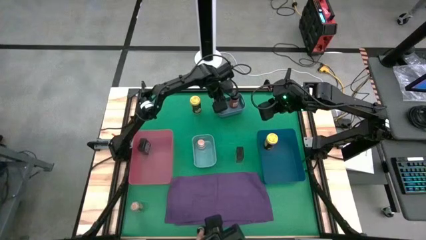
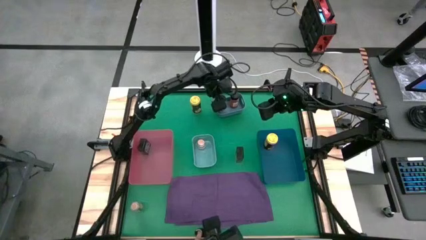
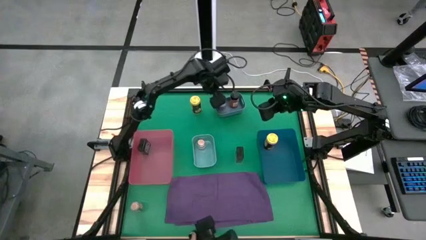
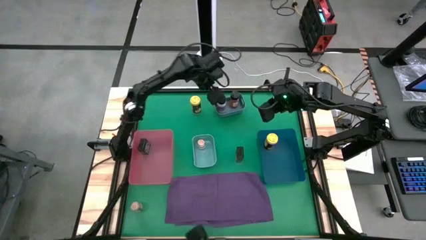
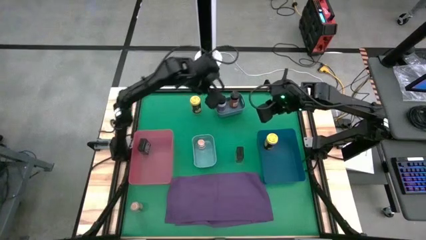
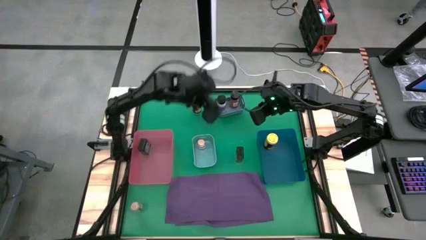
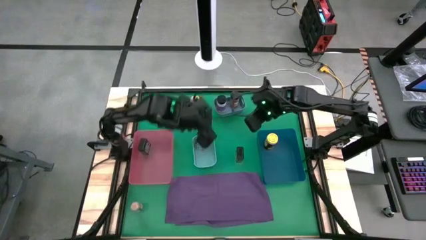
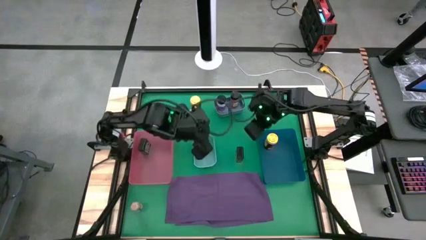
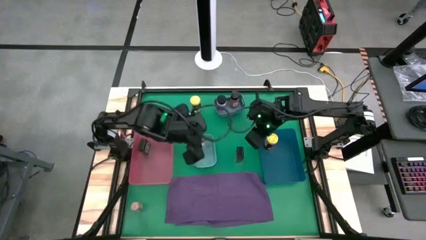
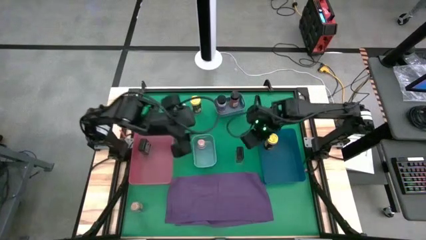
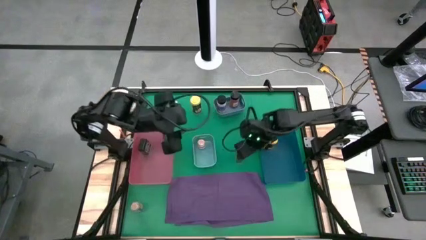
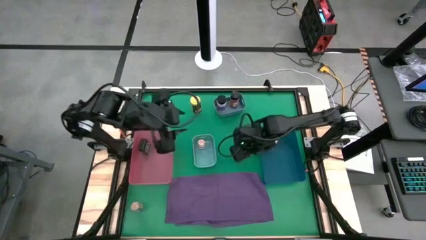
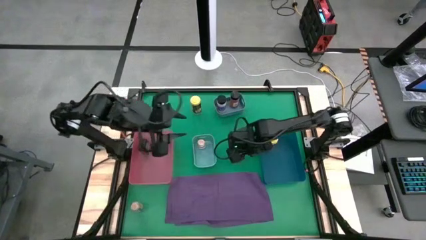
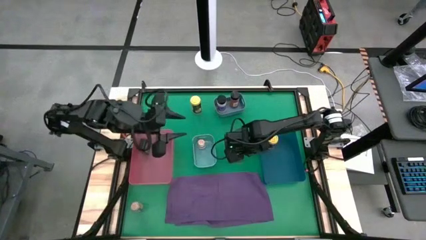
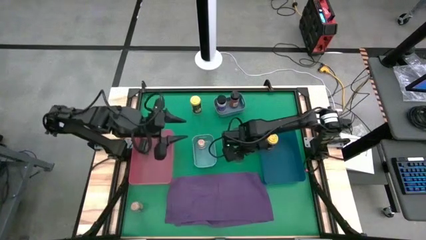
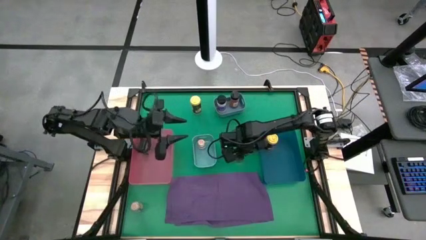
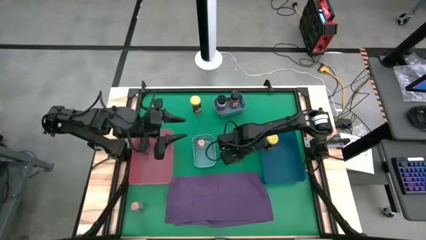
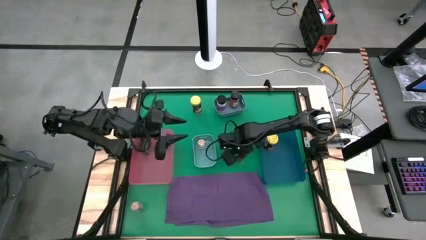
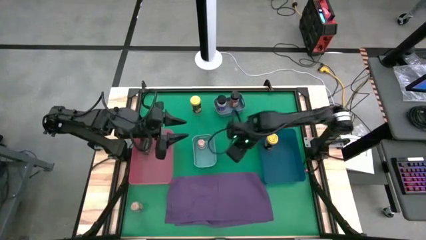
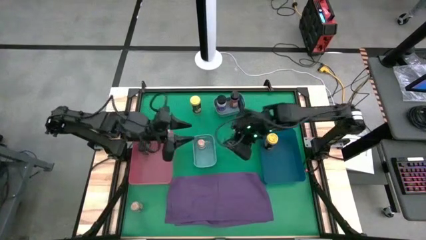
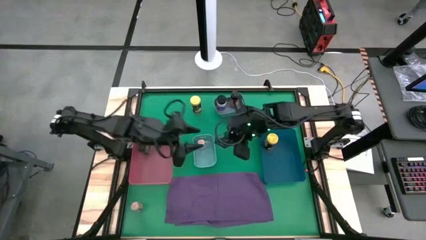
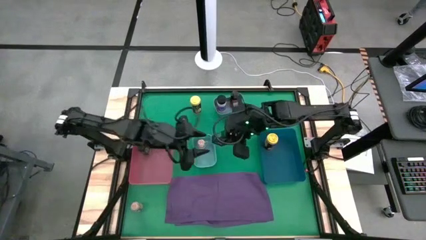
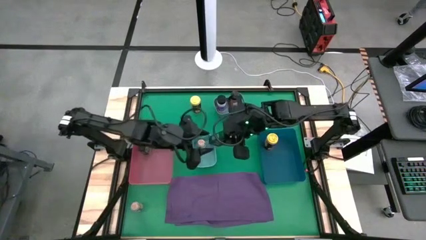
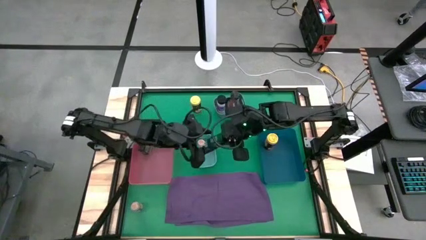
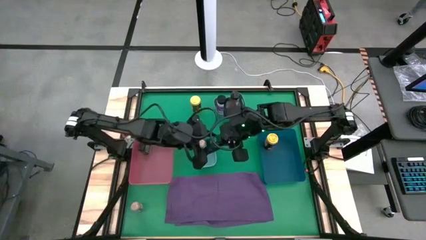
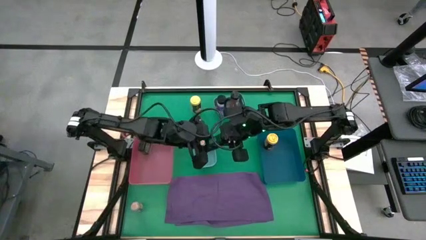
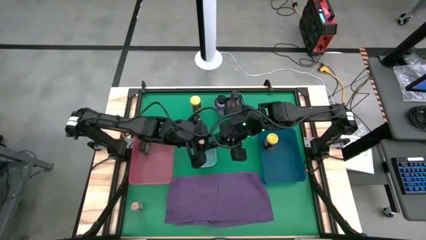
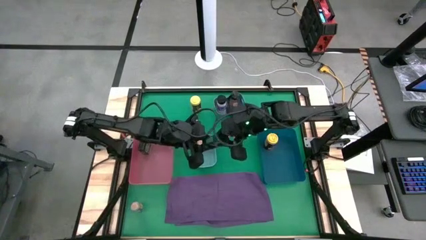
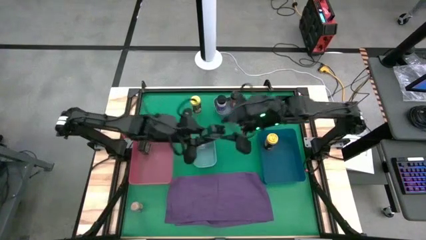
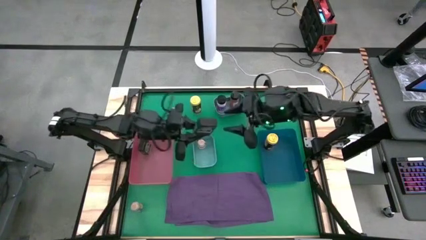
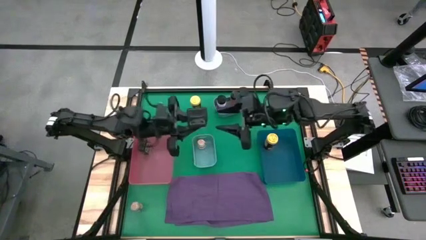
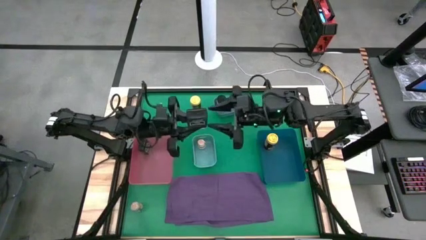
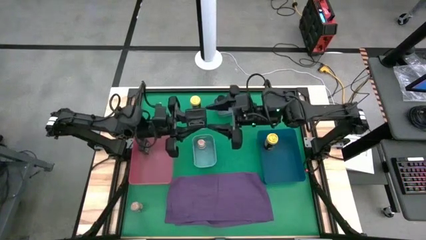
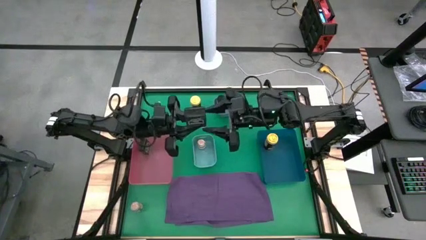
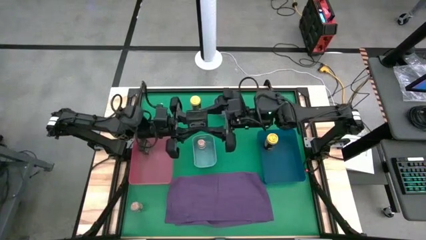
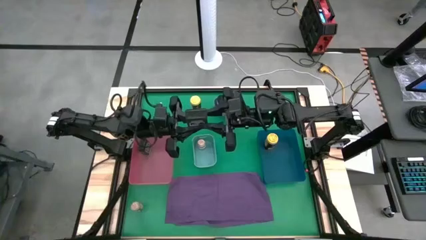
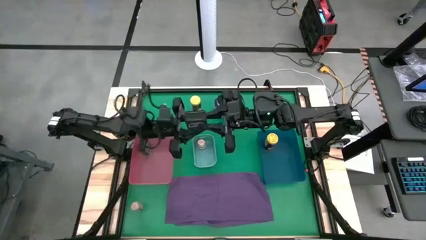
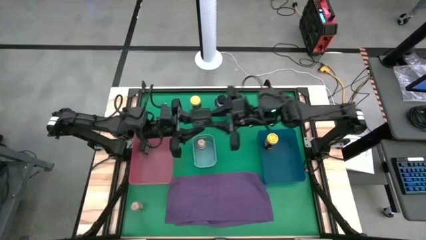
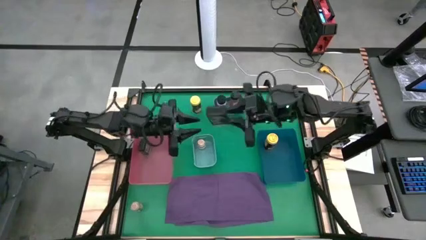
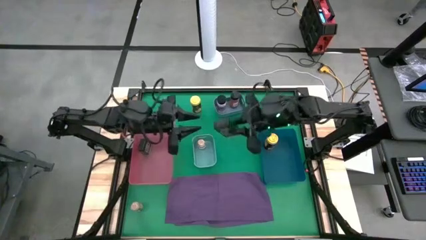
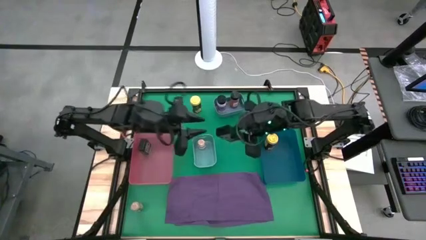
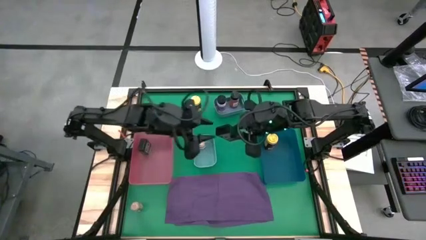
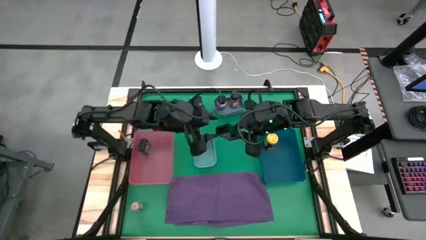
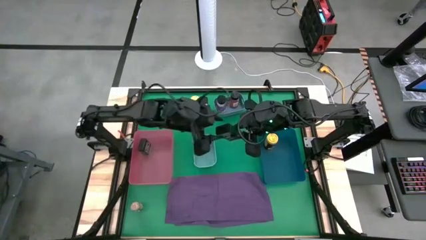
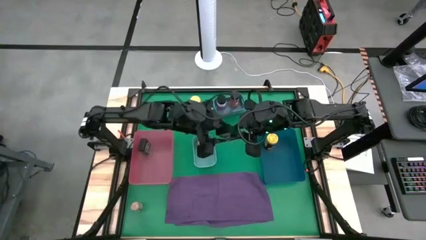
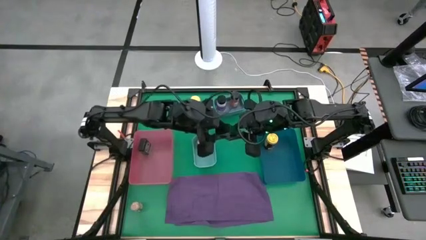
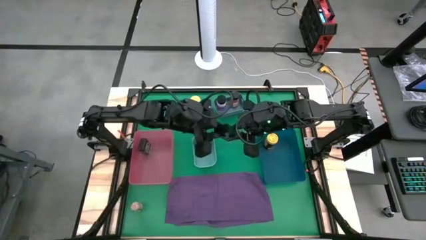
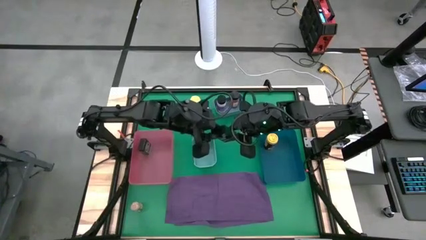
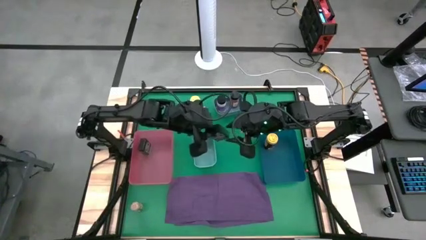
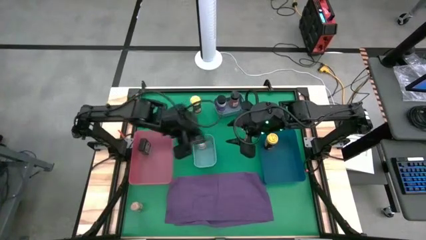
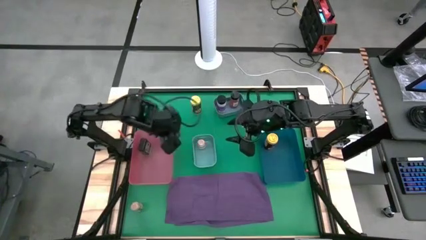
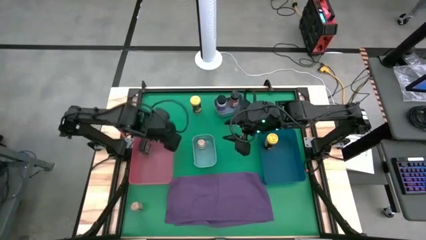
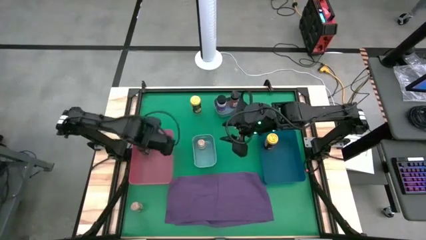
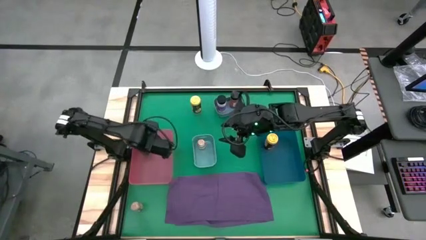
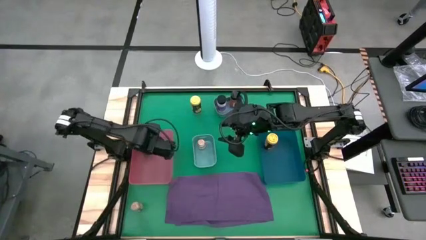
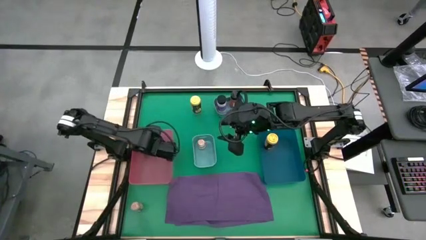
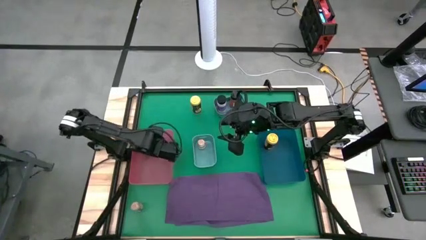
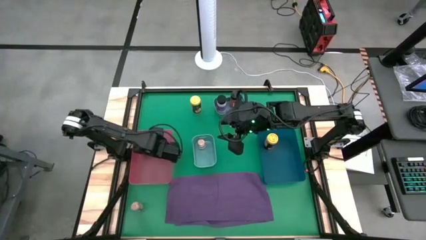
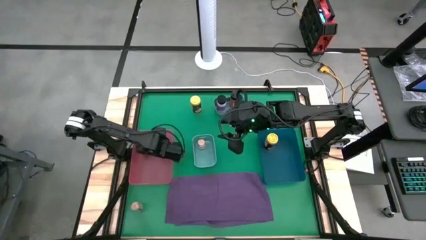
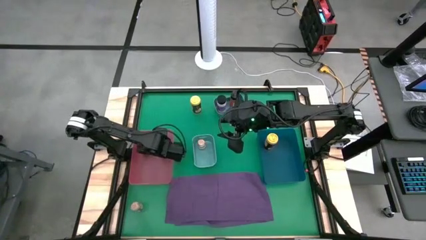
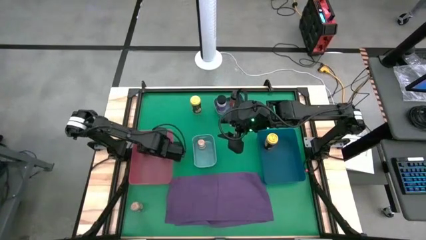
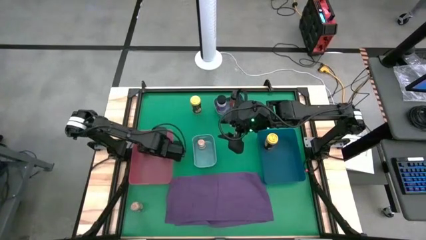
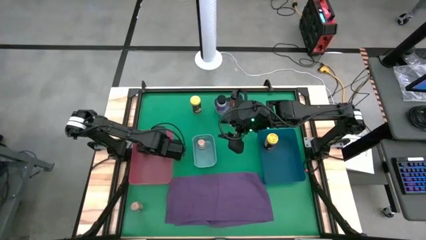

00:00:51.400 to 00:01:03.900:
Task: Sort spices by type
Put the black seasoning can into the pink bin

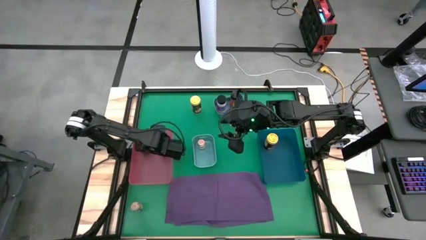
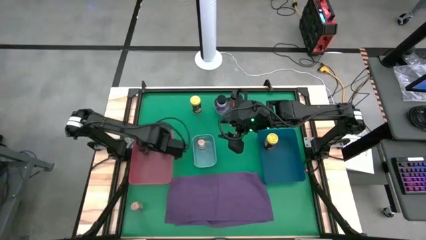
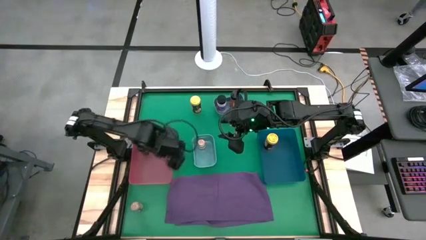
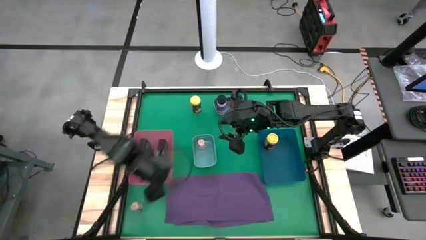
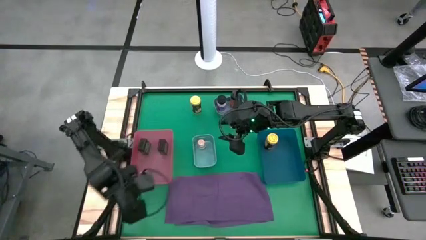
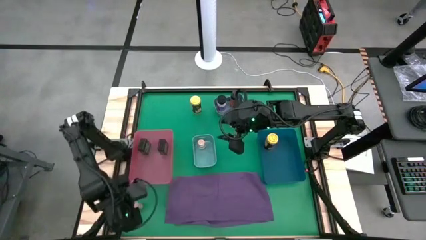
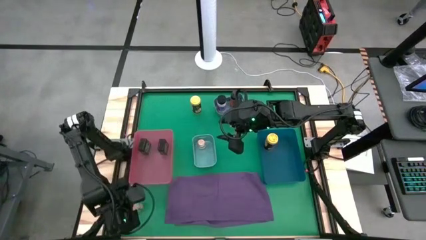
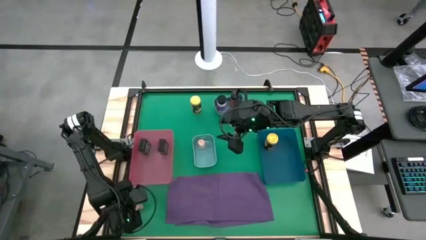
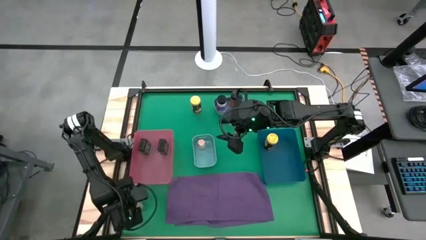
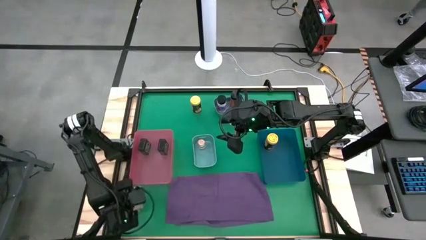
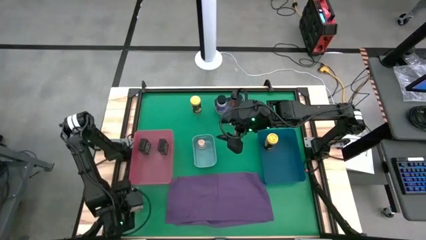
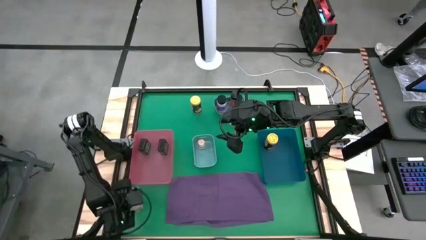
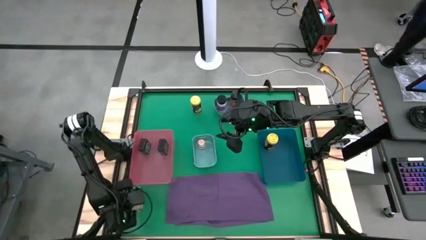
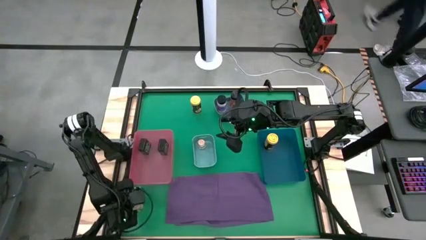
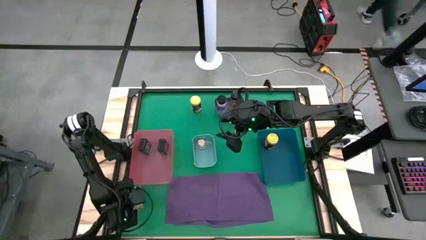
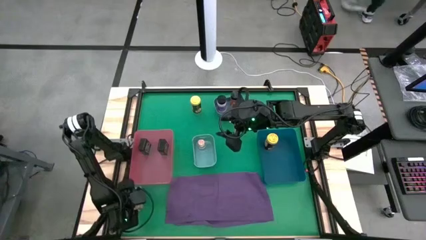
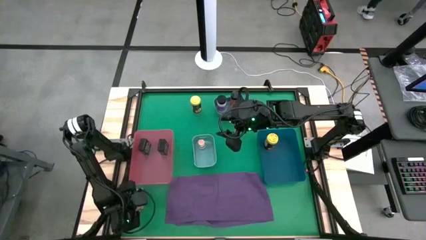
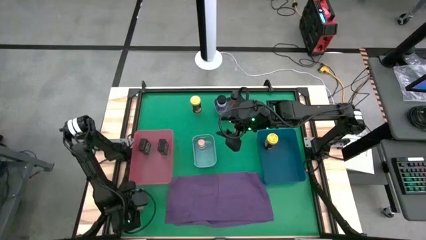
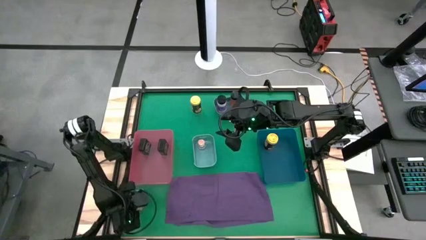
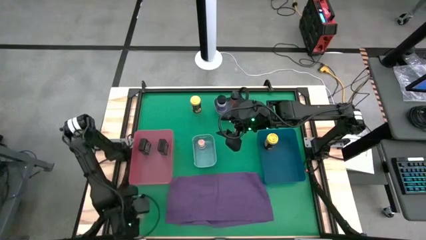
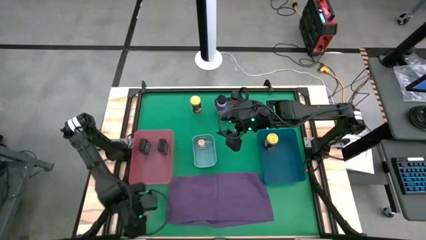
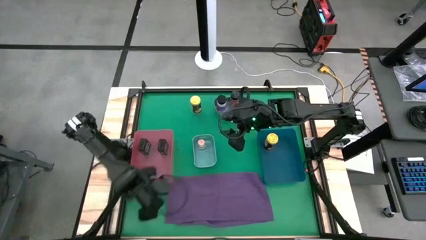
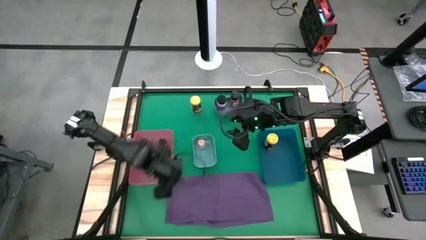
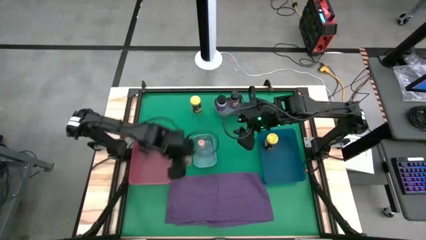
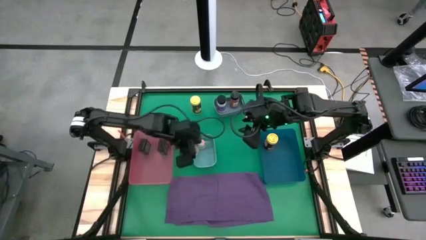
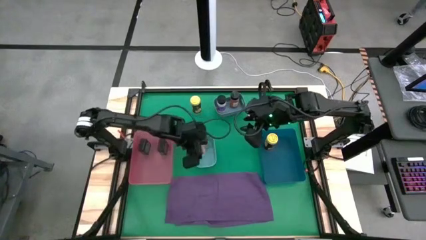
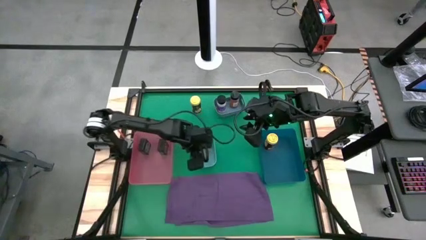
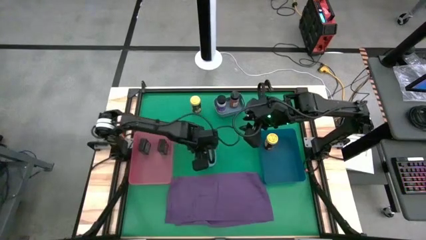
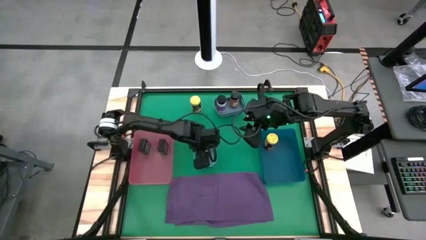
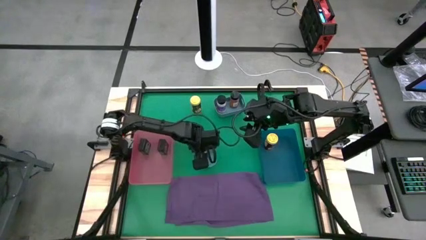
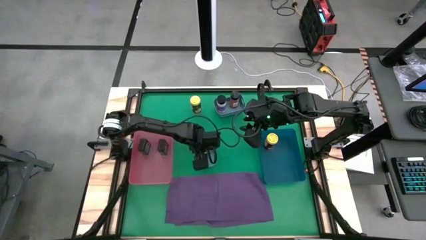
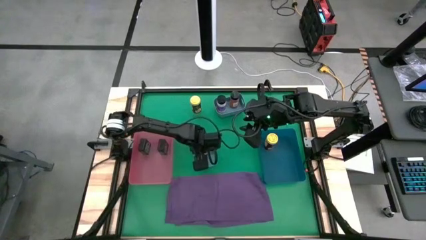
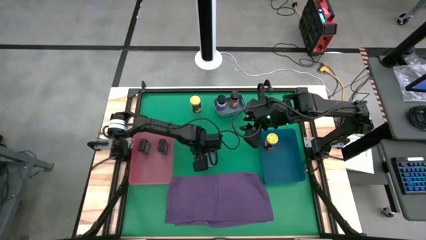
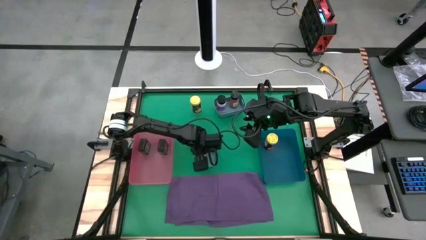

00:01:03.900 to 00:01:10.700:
Put the brown seasoning bottle into the green bin
